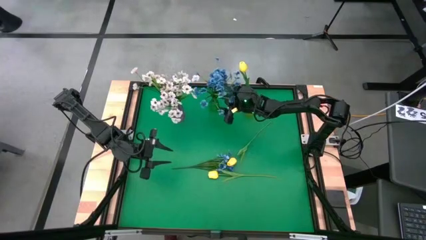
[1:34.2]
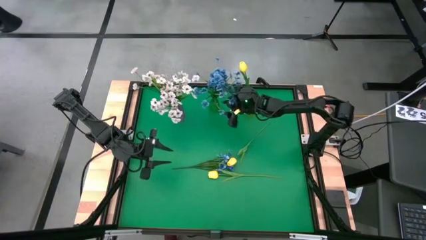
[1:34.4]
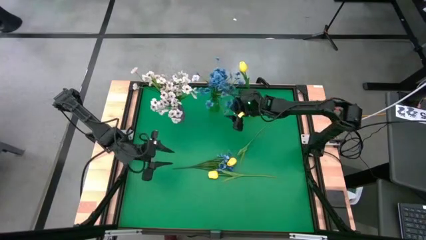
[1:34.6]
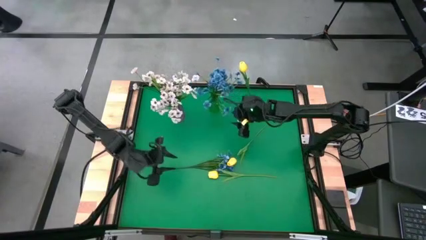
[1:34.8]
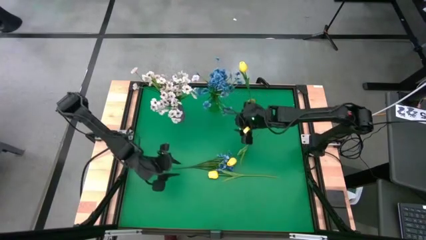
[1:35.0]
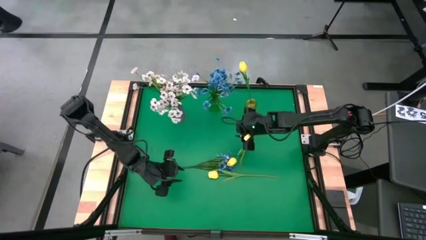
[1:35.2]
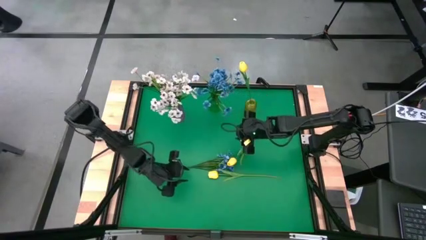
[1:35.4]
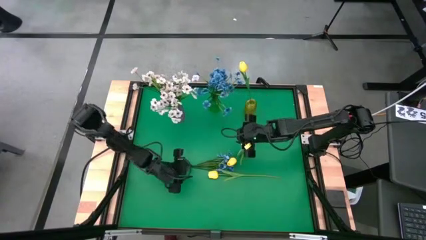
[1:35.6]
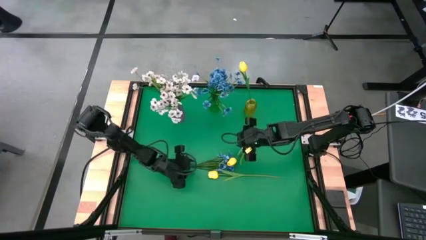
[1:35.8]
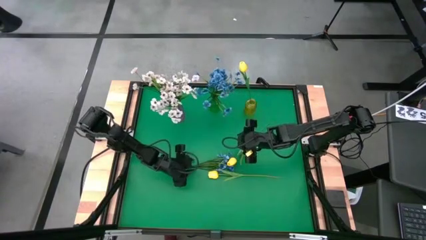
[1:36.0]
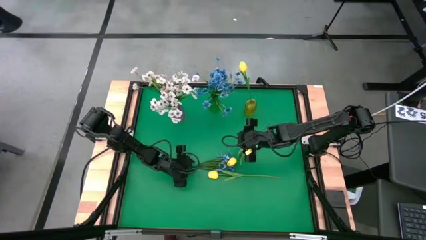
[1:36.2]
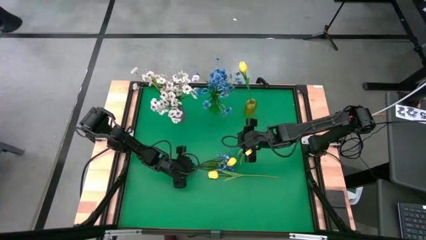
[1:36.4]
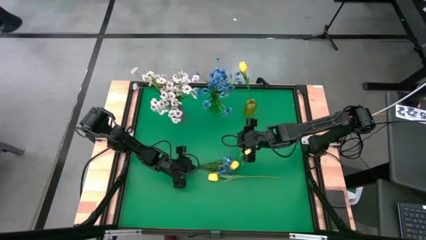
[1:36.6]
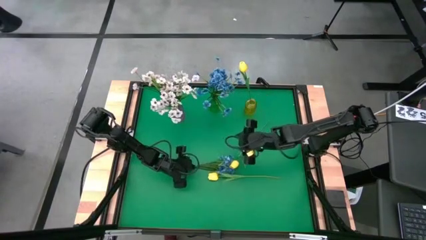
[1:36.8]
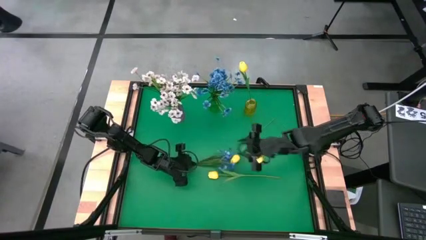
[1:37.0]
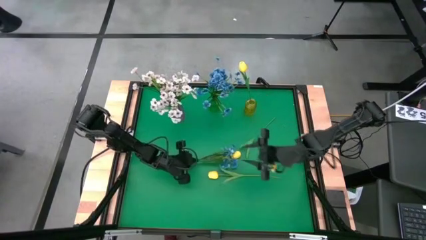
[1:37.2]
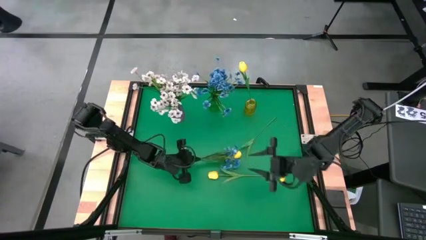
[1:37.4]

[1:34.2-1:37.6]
Task: Sort flowers into vase by color
Put the blue flower into the green vase

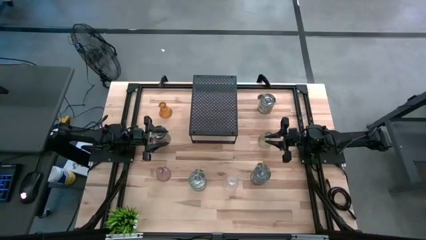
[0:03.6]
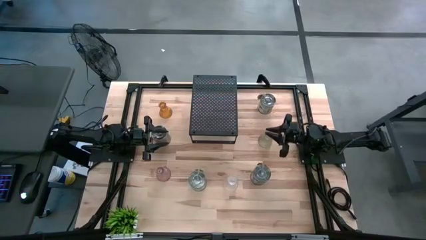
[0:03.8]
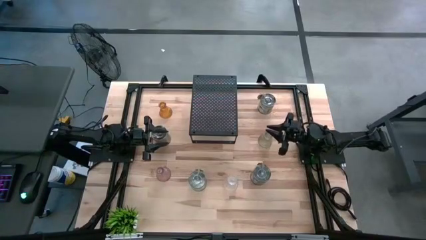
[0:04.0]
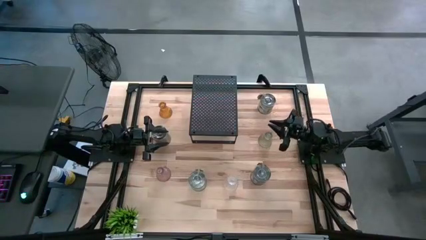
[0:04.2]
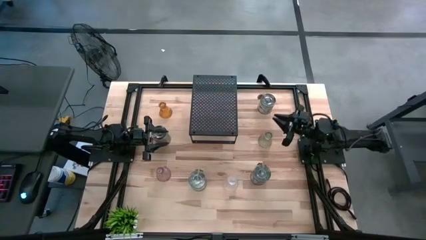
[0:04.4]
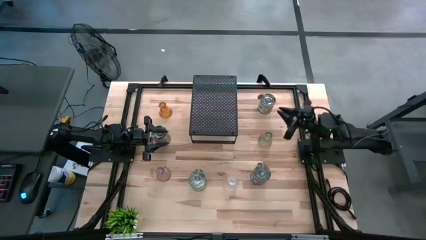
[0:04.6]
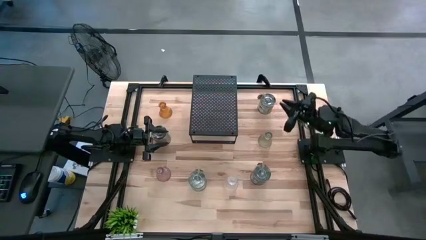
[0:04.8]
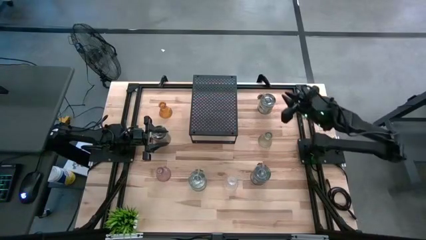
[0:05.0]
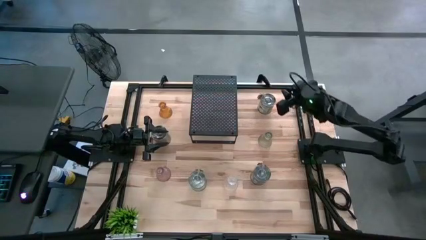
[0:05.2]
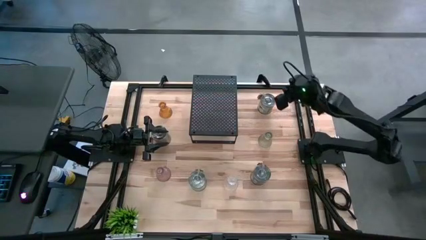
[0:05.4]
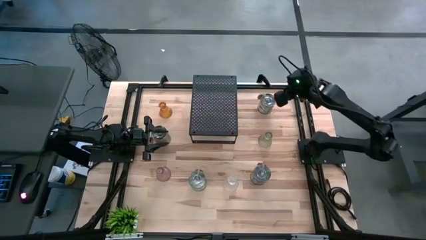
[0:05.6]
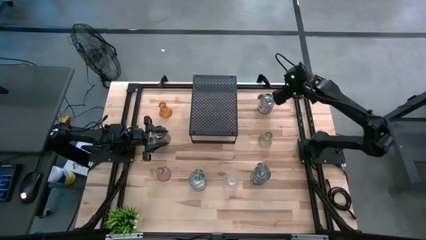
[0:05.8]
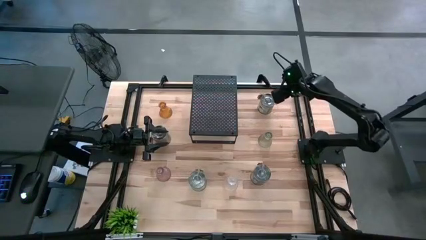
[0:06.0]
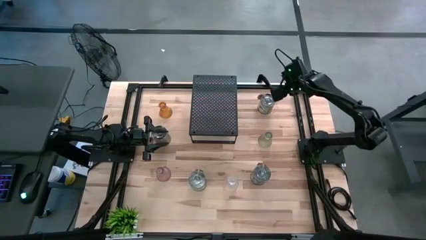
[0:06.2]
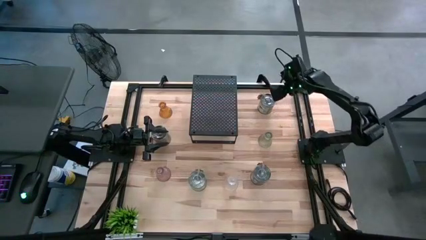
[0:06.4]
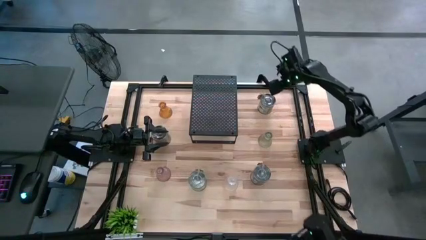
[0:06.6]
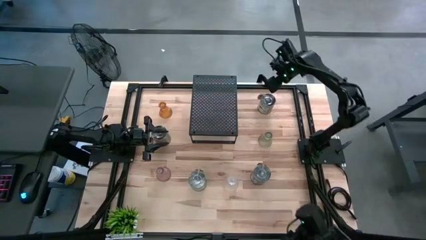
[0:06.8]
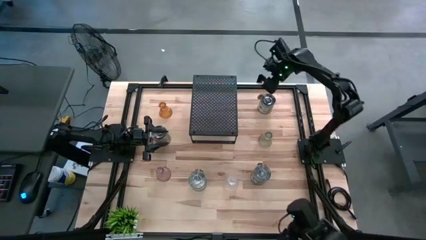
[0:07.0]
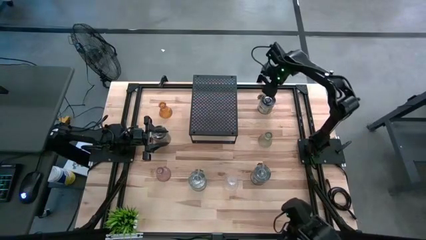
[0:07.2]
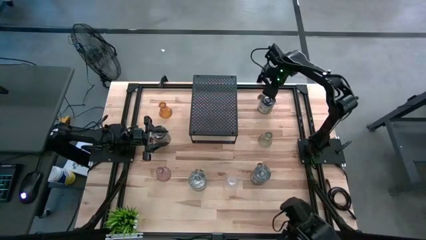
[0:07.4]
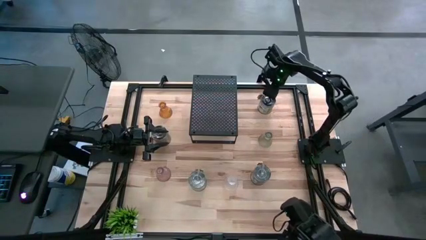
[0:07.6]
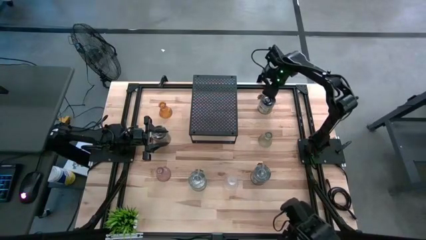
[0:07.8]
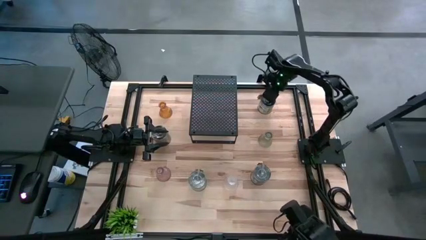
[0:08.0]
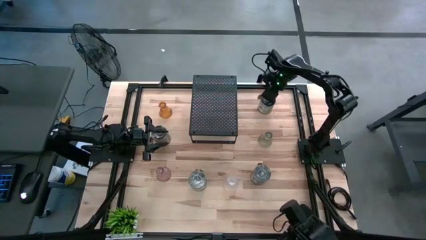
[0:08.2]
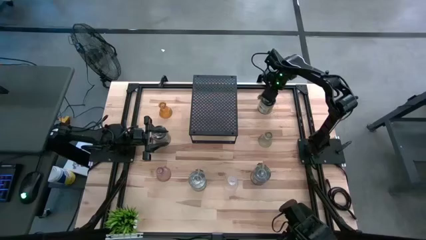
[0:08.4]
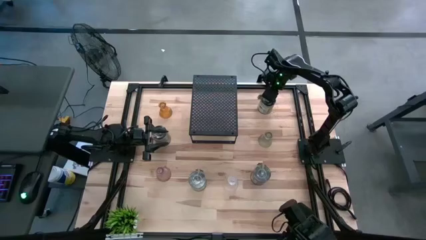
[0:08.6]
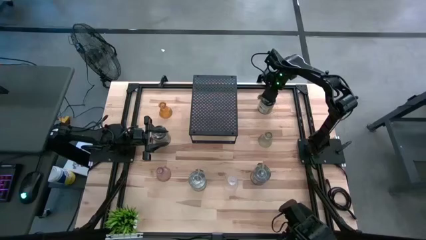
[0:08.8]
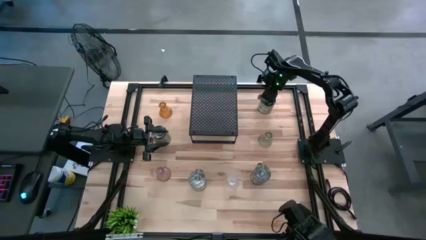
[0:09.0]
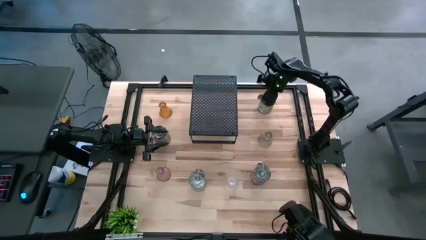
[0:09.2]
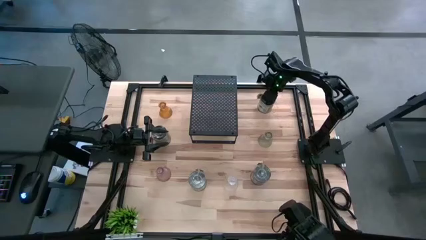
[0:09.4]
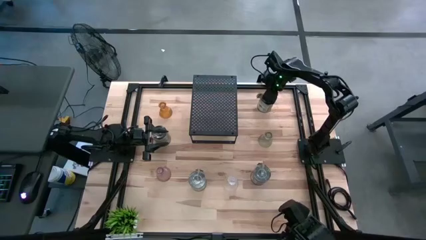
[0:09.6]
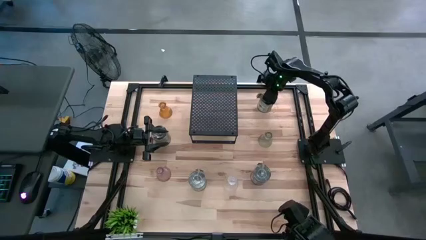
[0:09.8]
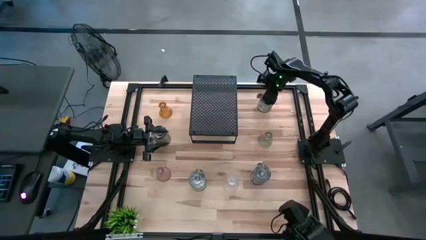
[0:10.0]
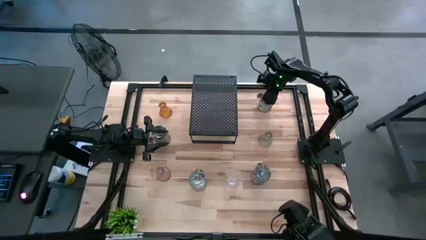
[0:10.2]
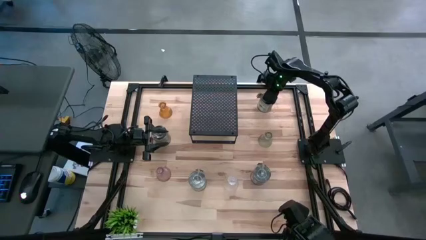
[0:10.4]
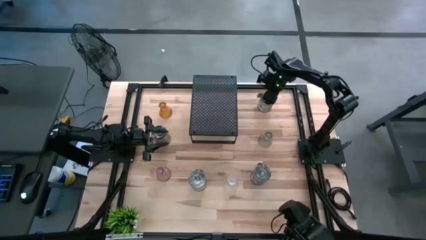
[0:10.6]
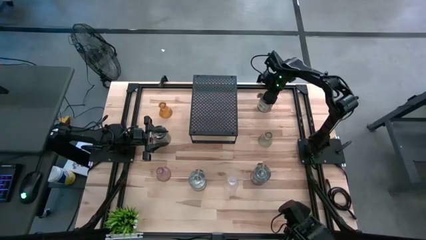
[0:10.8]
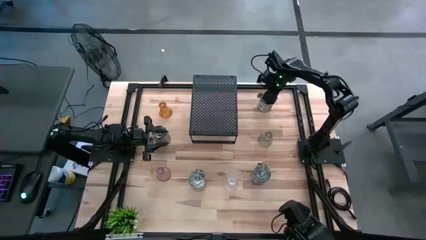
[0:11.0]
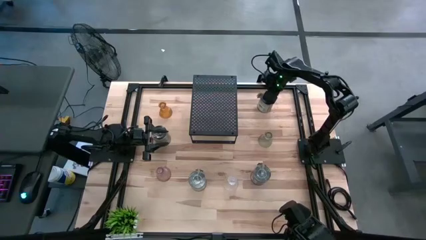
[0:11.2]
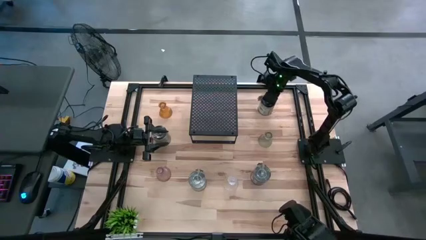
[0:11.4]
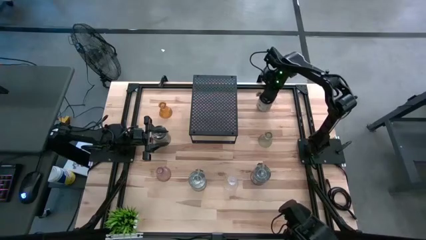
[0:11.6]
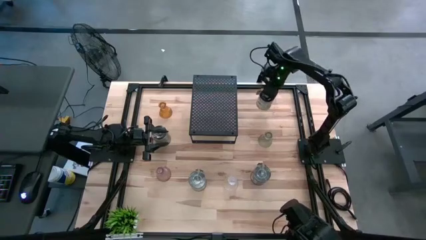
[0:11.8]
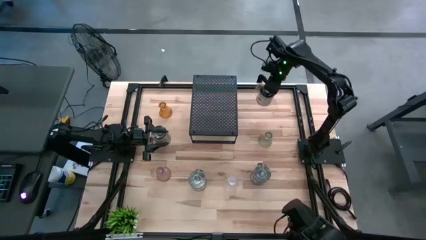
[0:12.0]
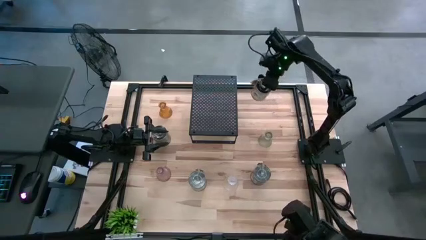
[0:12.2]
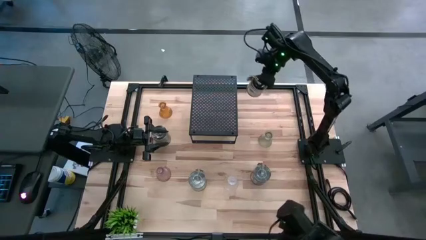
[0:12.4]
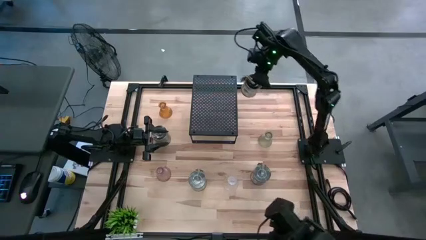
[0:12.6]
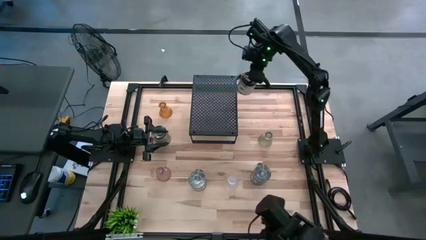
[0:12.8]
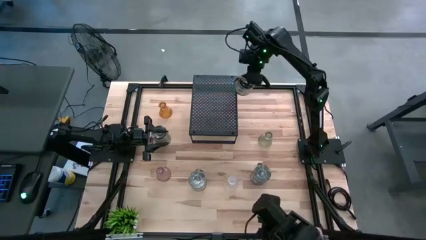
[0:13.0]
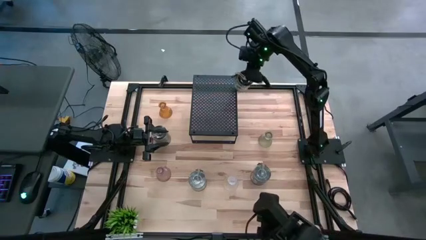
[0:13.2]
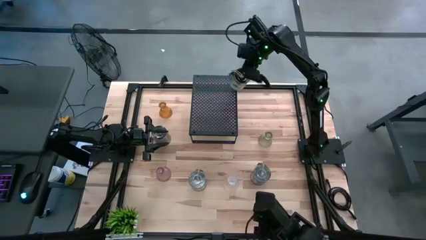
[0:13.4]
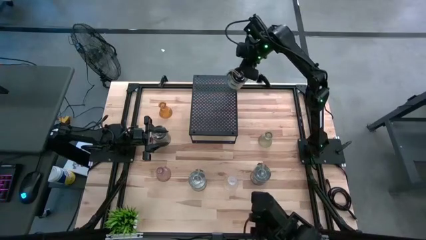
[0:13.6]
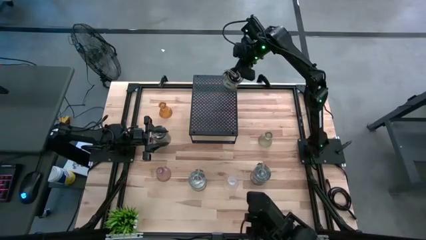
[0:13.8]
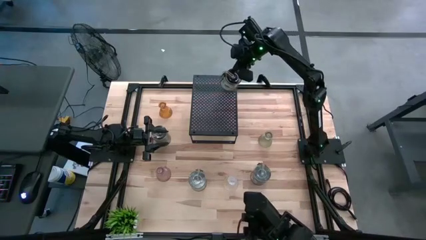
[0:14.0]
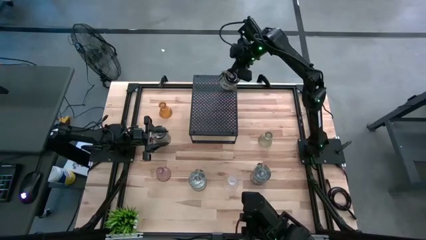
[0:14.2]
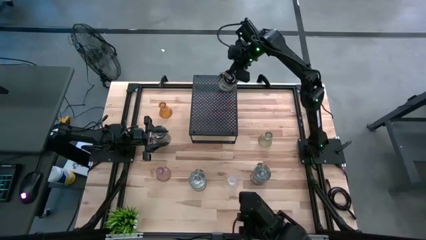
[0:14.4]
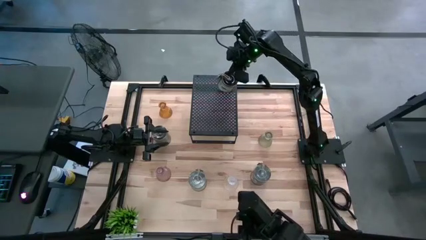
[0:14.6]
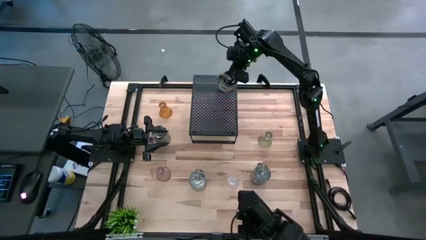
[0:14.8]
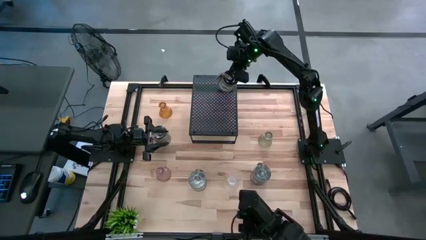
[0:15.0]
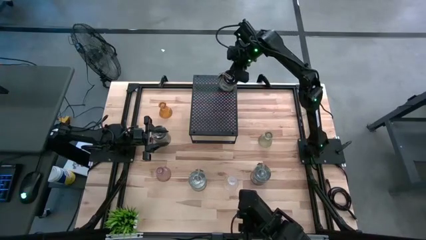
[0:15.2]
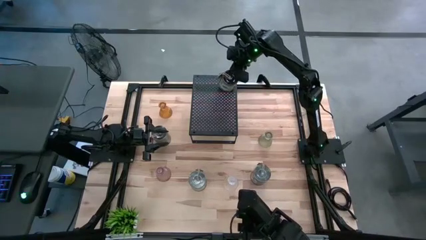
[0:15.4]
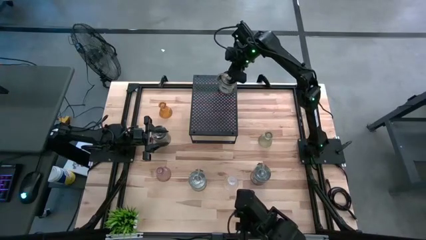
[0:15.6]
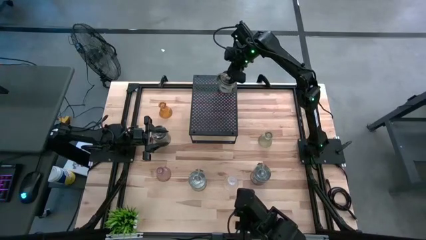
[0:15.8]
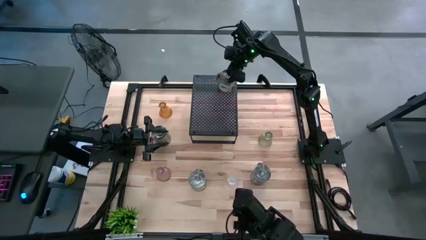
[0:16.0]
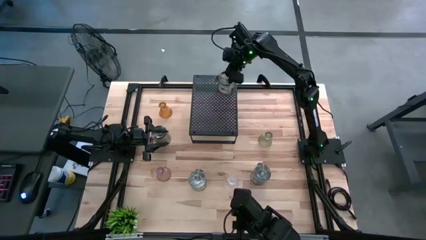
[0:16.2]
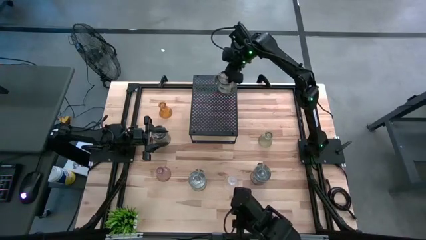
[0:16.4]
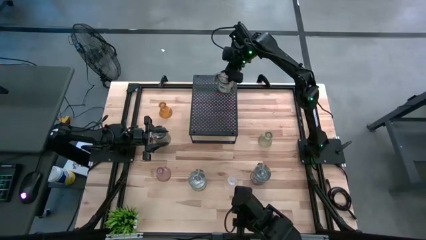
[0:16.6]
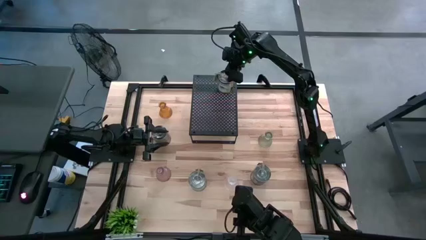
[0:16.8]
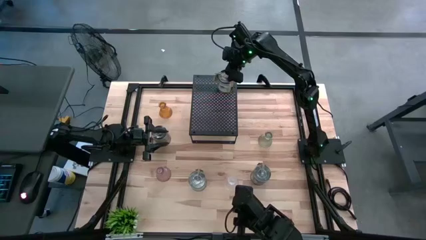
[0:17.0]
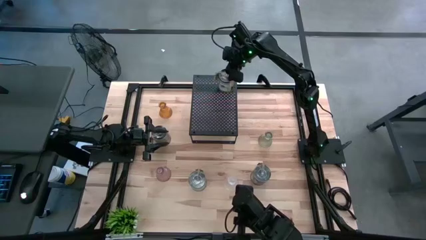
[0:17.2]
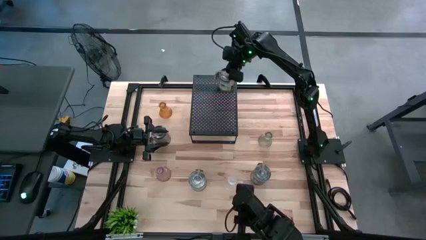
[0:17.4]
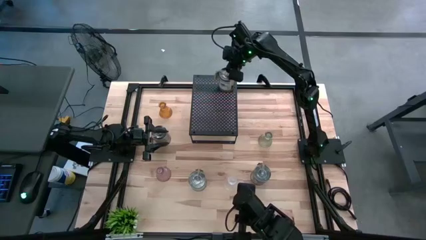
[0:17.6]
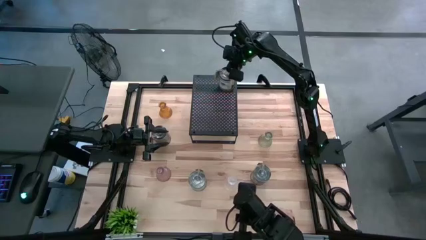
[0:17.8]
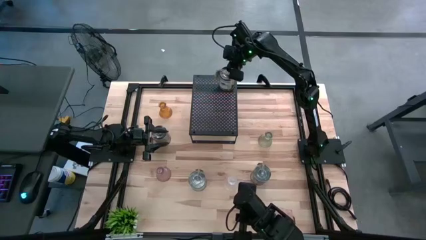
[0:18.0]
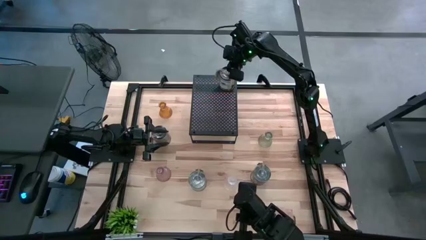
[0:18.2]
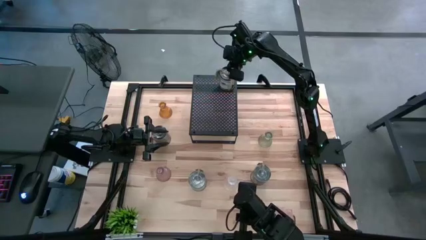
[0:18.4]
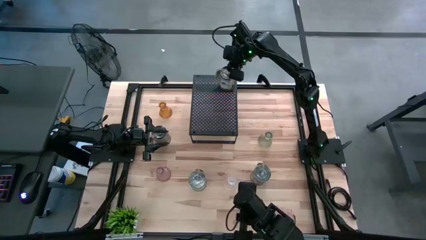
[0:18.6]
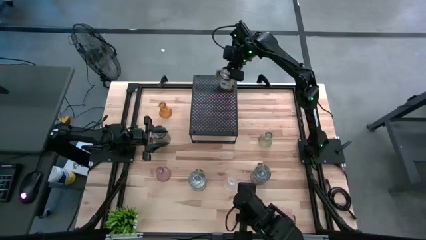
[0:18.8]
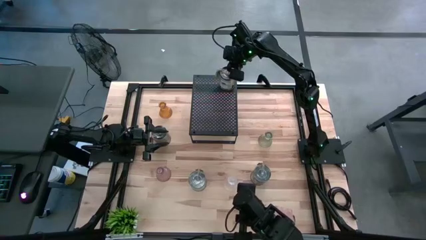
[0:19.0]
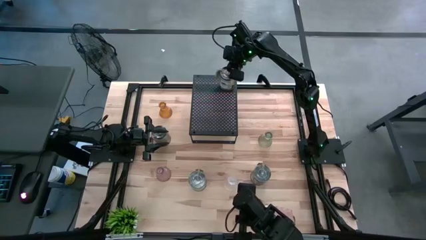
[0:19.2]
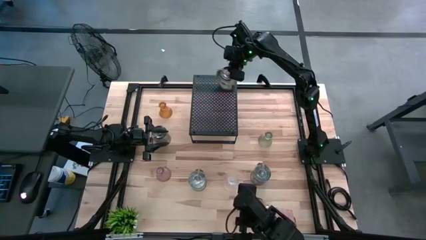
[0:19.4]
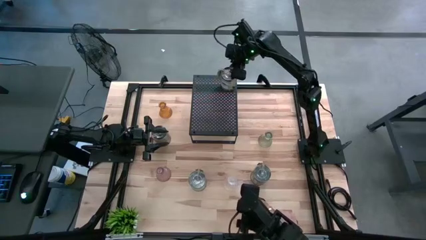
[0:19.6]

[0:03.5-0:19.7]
Task: Pick & Place candle stick holders
Put the silver scented candle on the black shelf
